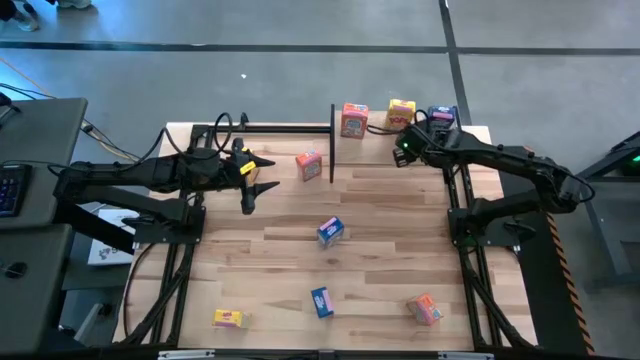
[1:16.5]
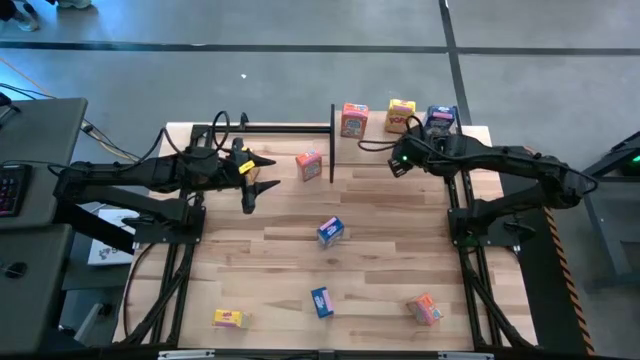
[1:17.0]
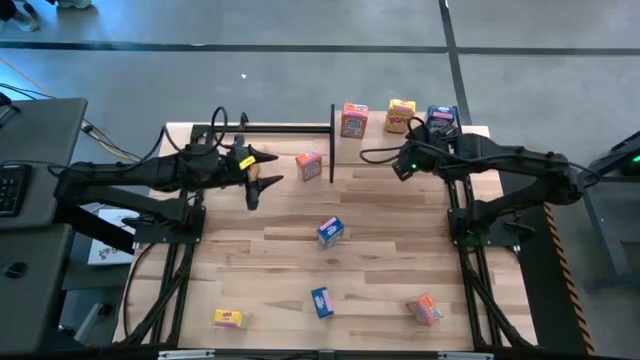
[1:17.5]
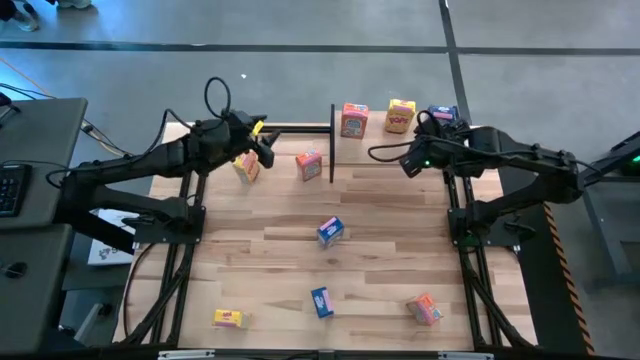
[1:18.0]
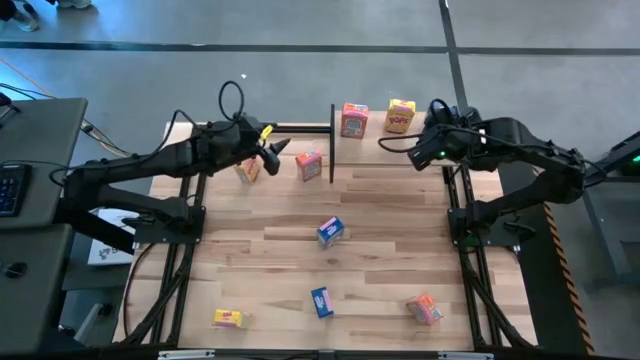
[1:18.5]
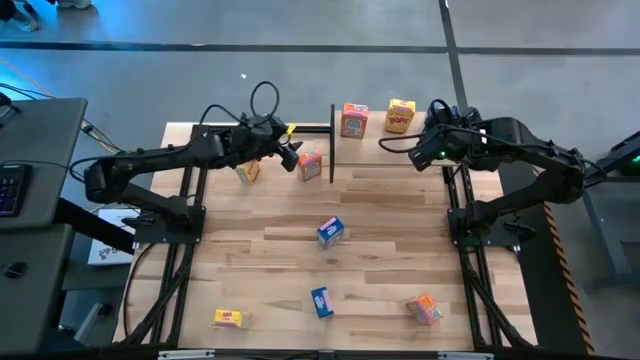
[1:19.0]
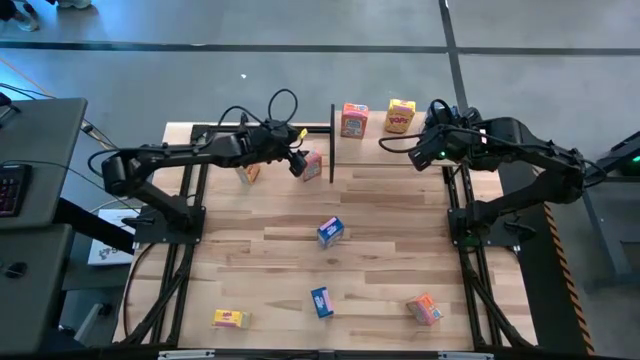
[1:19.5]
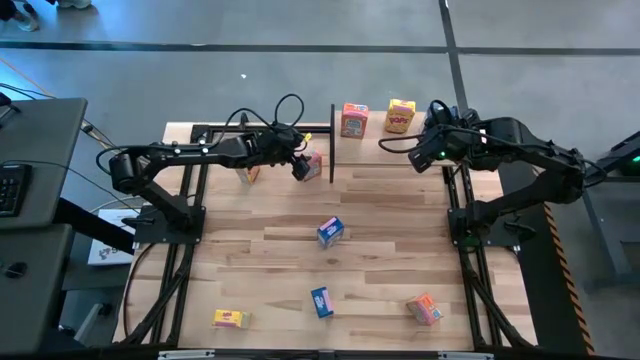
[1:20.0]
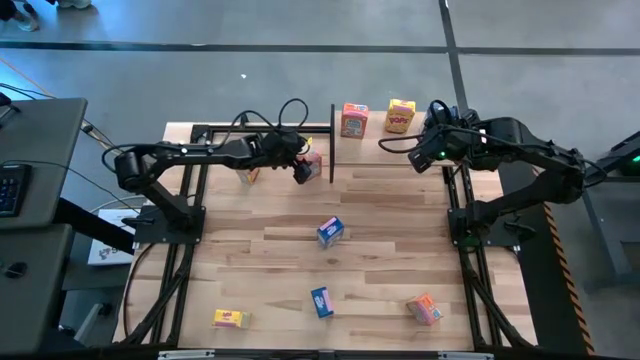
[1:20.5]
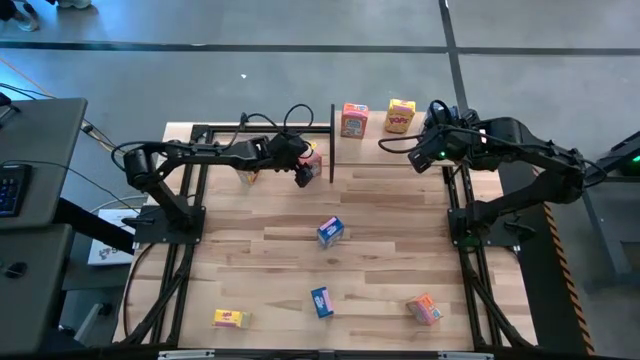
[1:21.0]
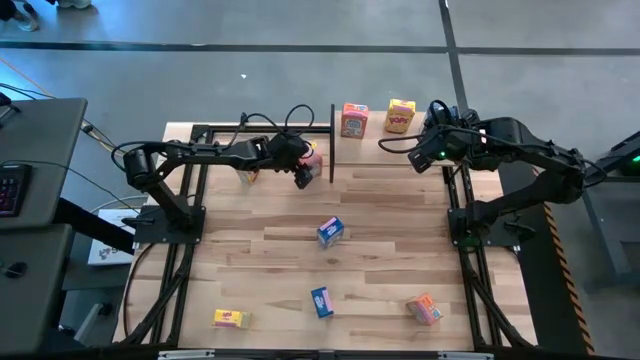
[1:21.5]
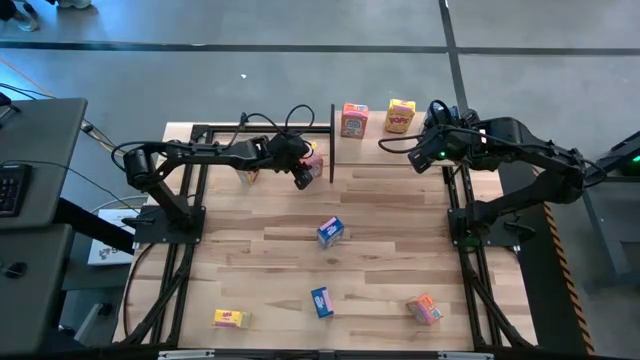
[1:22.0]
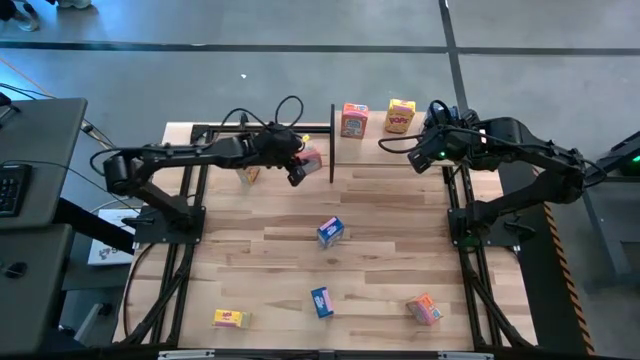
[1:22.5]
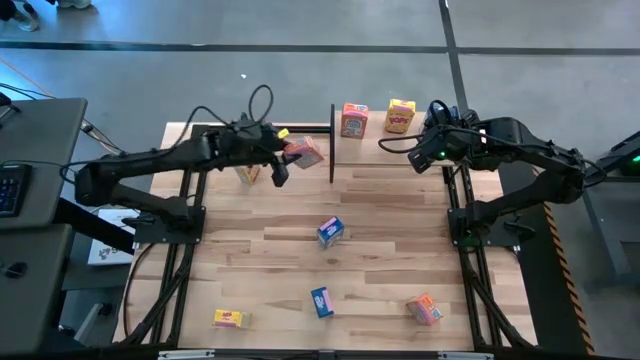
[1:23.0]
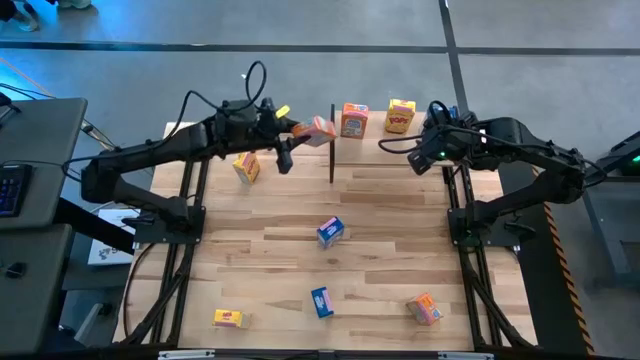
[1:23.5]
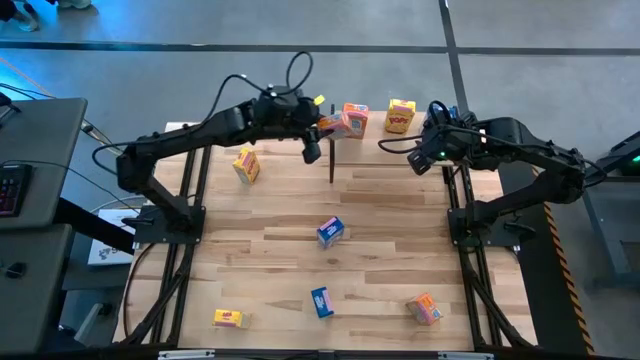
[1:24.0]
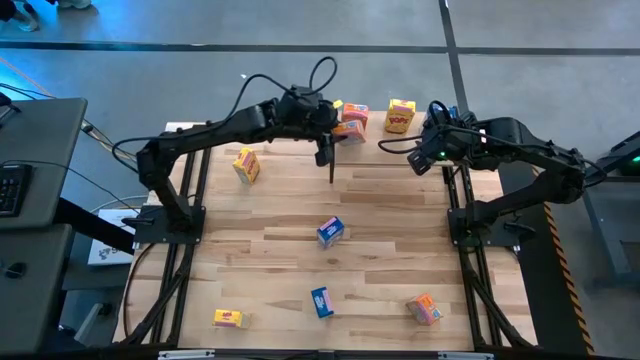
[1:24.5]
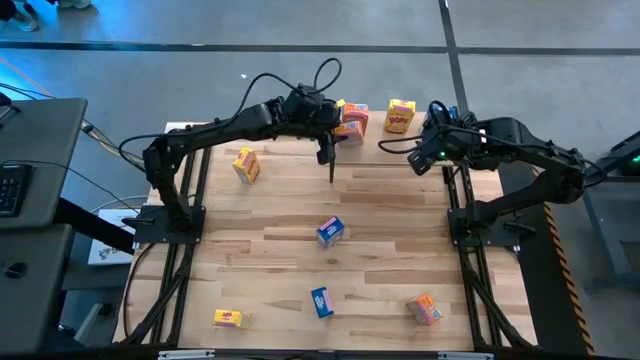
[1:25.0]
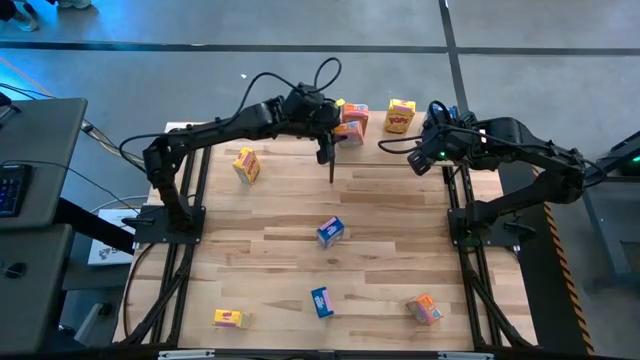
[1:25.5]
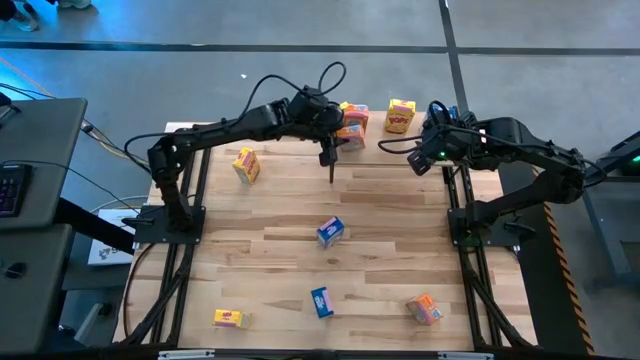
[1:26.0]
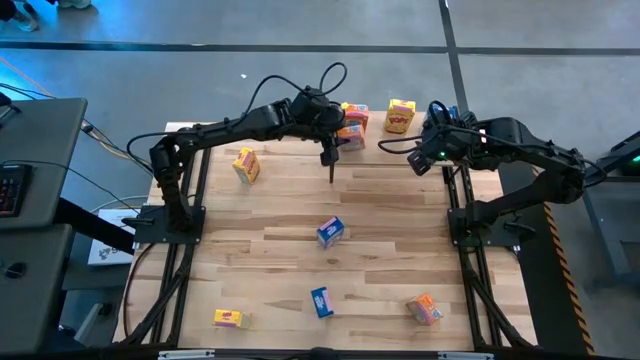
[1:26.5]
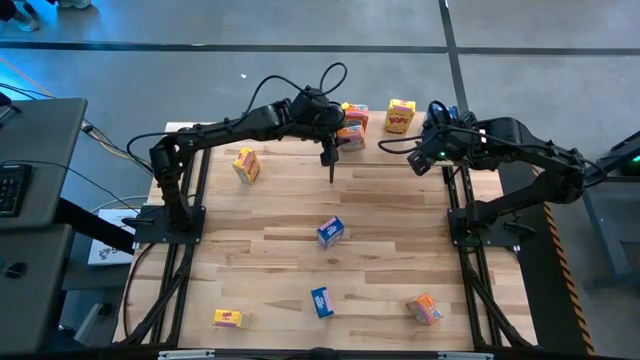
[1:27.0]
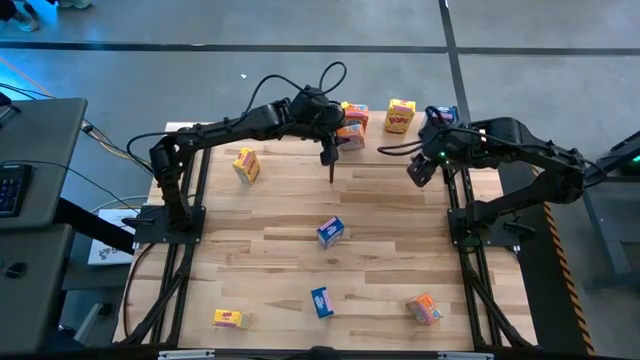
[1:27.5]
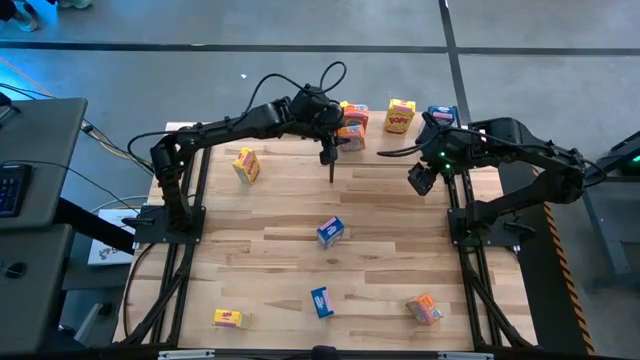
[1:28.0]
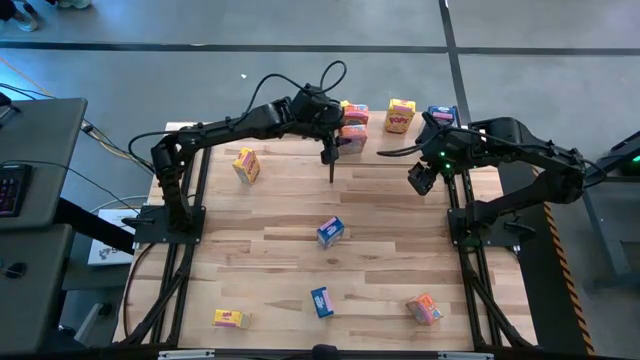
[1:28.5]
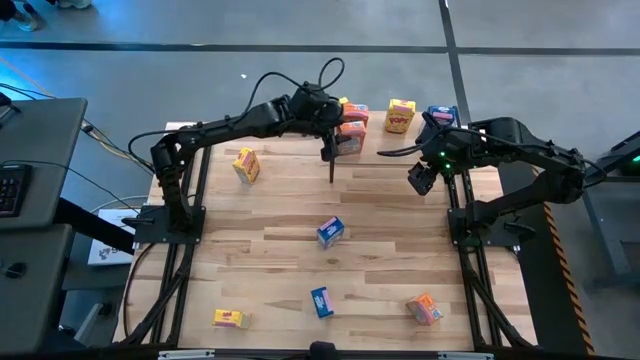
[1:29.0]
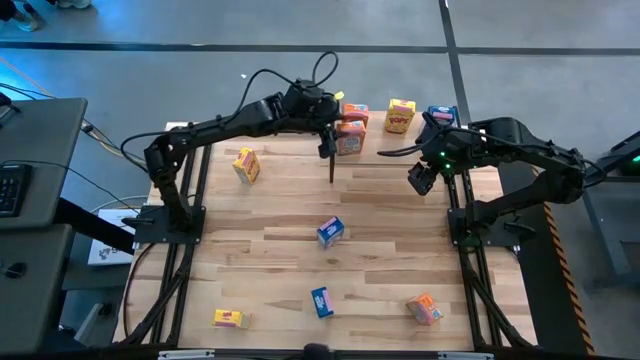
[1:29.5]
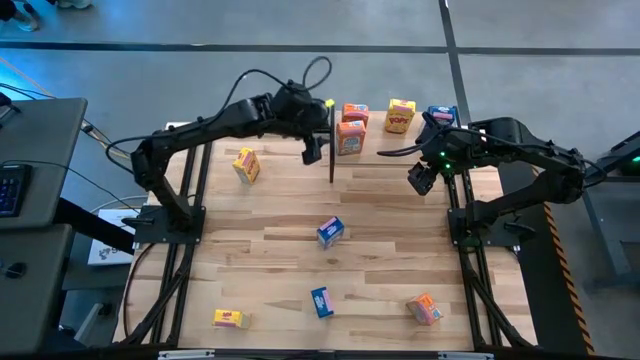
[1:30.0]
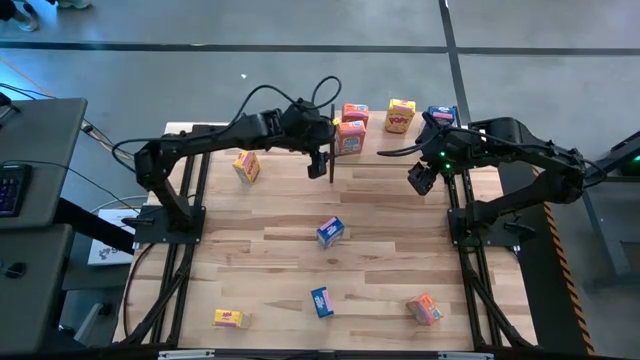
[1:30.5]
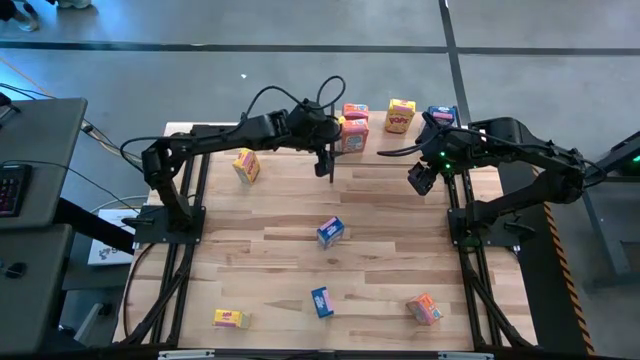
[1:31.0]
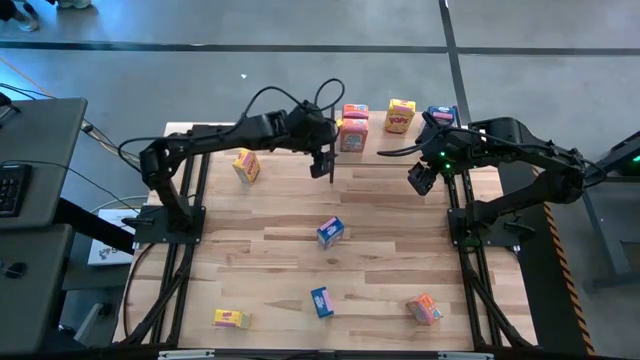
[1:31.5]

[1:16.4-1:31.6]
Task: Stack cereal on shelf
Put the top orange cereal box on the shelf aligned with the other orange cereal box

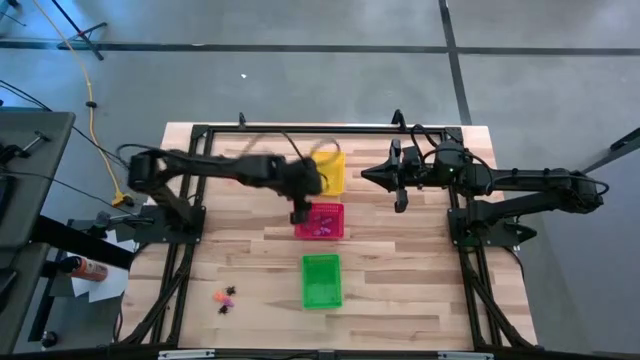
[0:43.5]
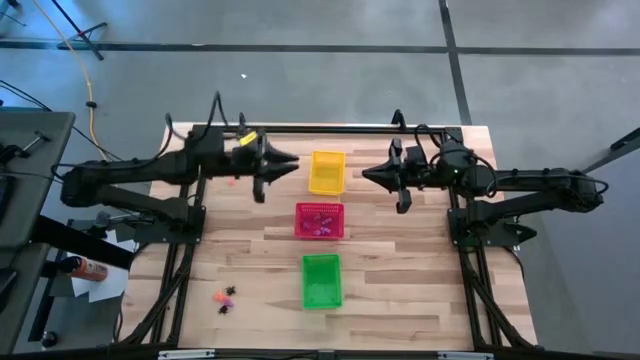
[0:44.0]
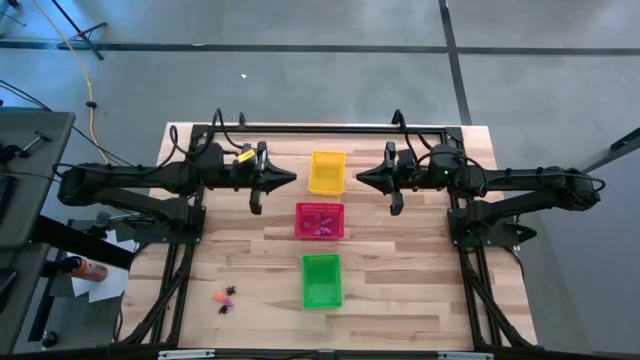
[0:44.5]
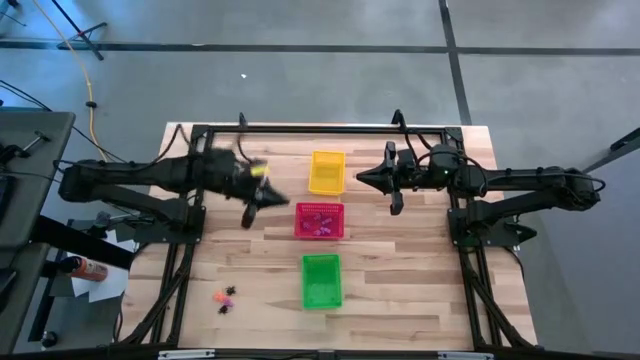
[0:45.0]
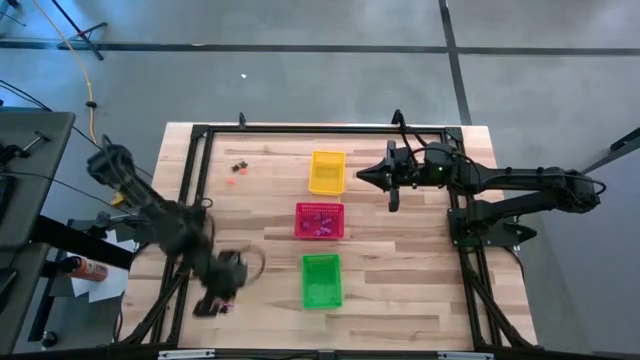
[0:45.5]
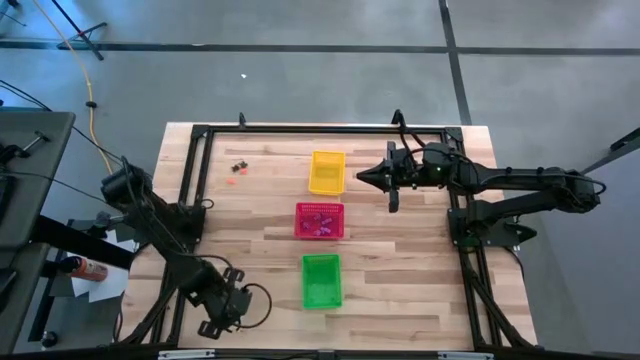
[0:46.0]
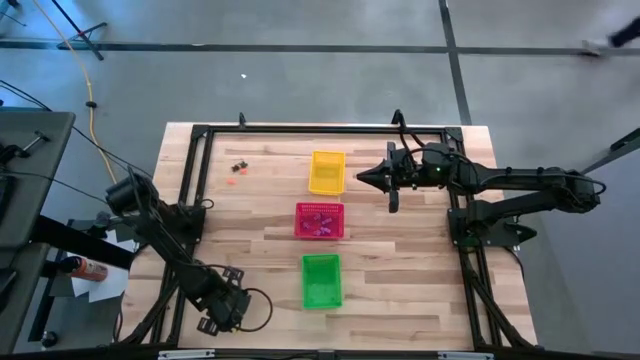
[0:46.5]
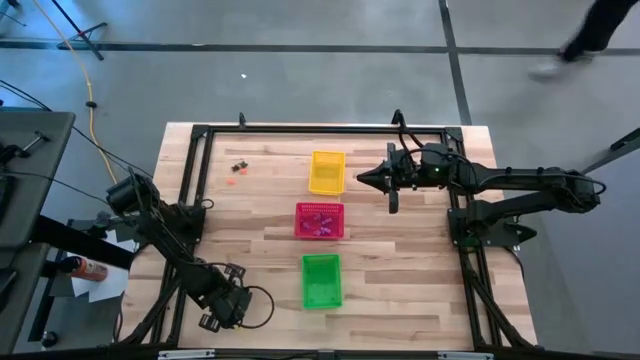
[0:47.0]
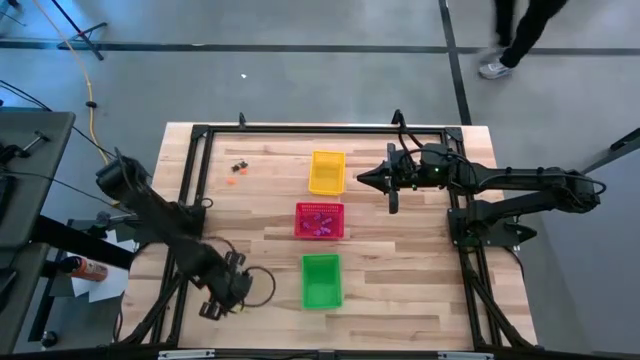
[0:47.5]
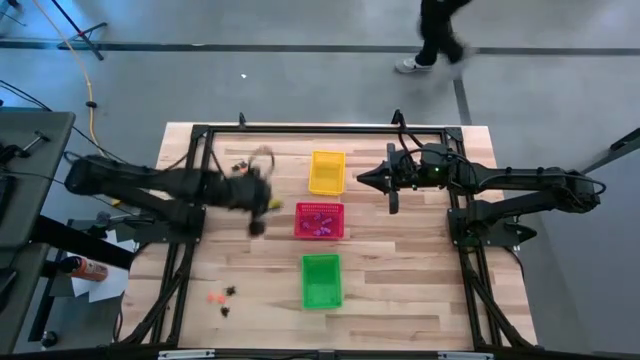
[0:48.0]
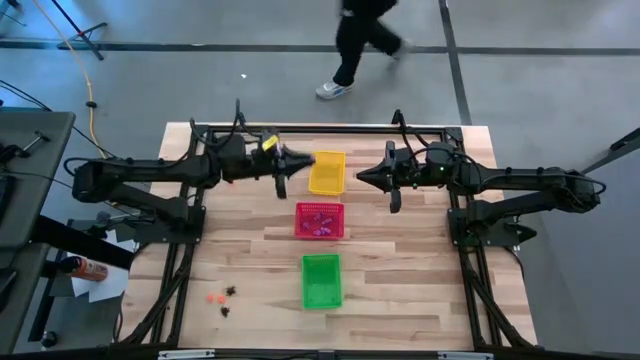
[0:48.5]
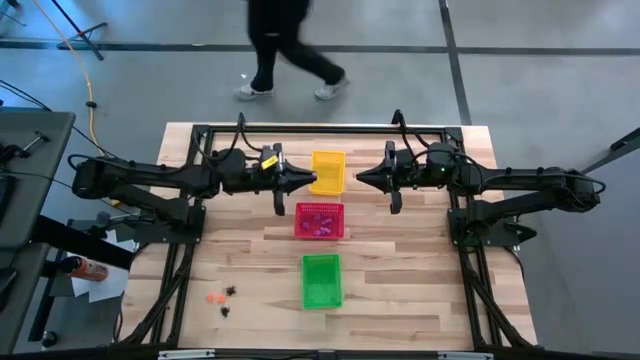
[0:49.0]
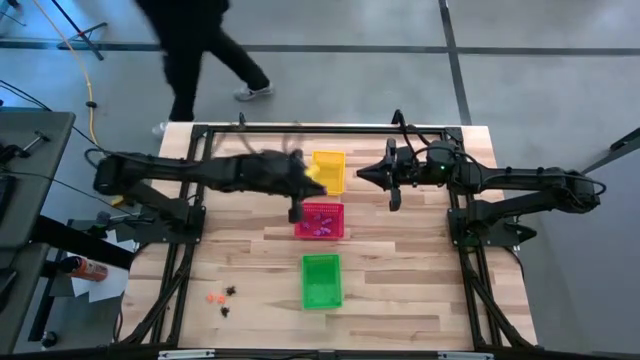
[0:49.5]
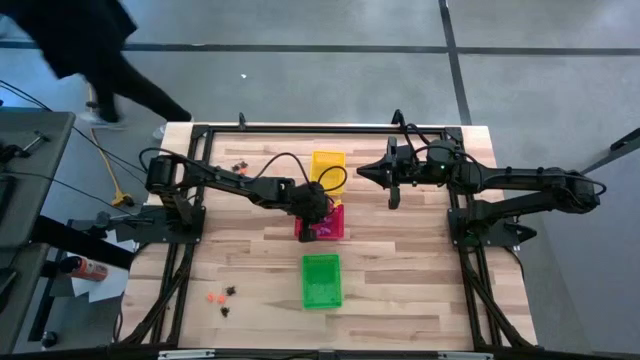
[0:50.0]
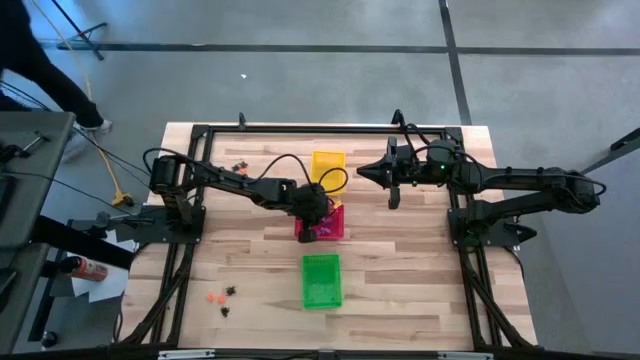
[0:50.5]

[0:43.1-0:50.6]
Task: Sort Halloween decoration
Put the skeleton into the red bin
